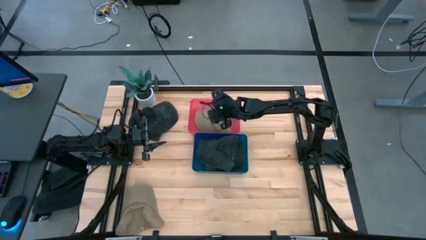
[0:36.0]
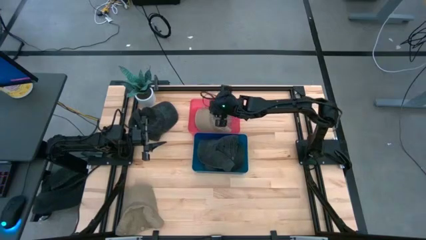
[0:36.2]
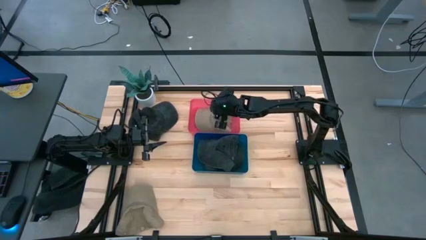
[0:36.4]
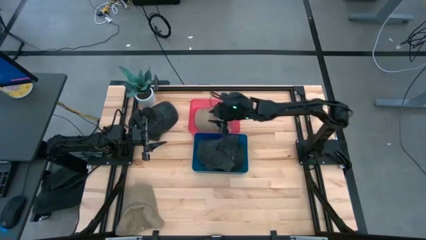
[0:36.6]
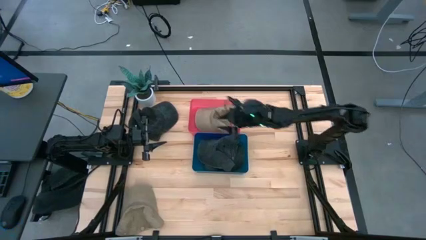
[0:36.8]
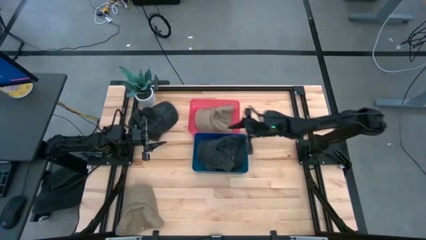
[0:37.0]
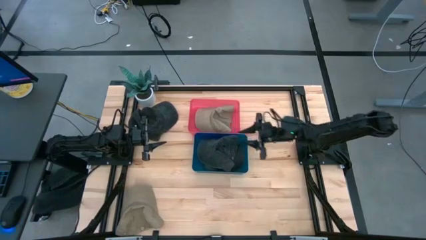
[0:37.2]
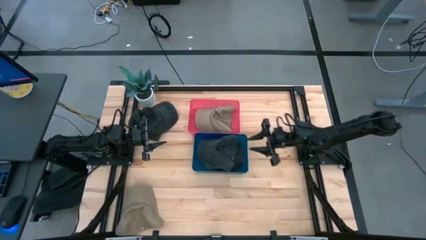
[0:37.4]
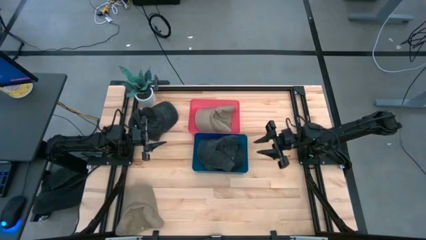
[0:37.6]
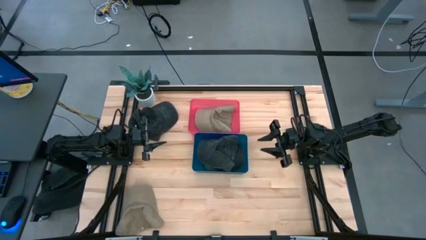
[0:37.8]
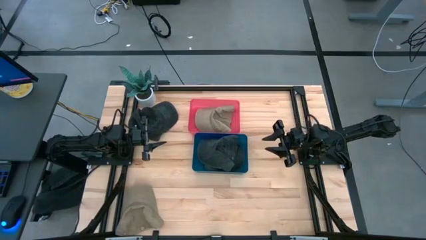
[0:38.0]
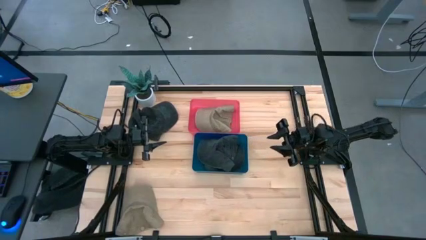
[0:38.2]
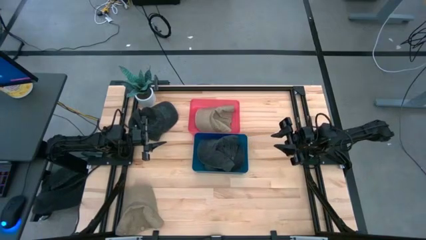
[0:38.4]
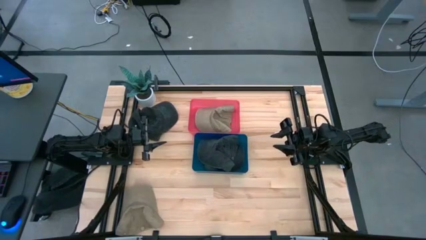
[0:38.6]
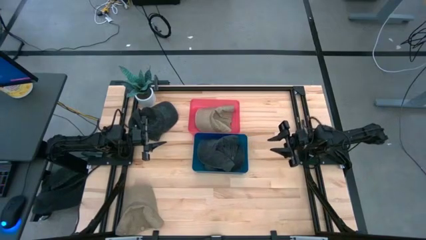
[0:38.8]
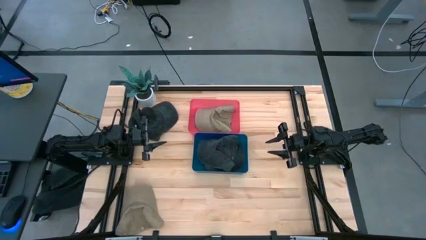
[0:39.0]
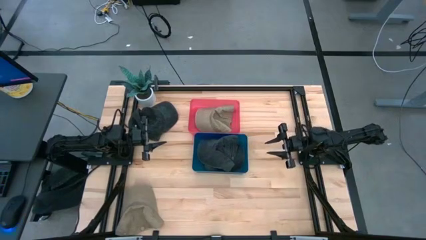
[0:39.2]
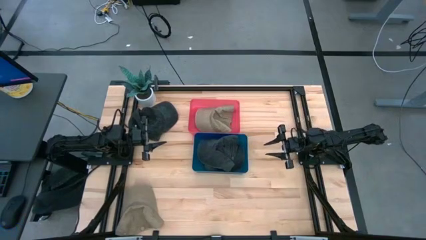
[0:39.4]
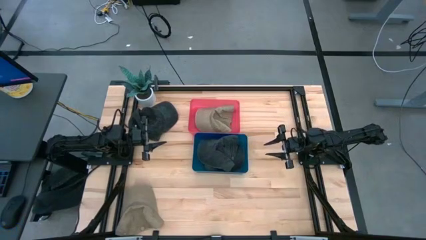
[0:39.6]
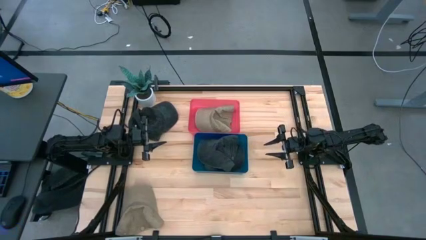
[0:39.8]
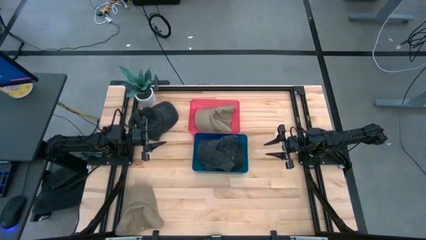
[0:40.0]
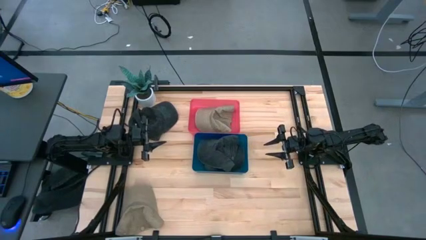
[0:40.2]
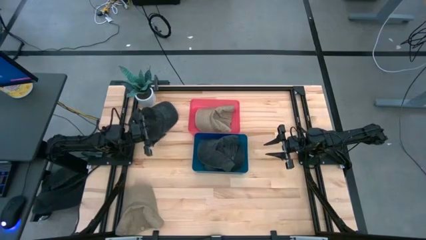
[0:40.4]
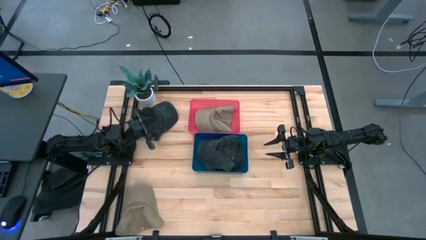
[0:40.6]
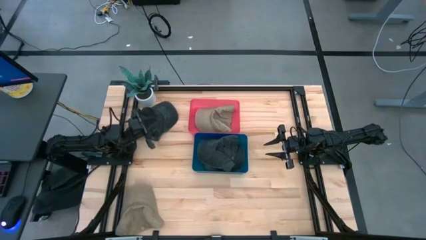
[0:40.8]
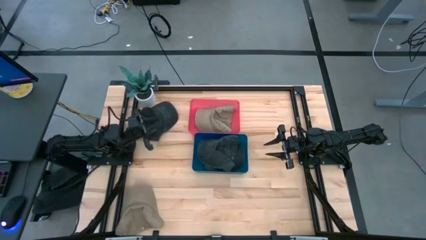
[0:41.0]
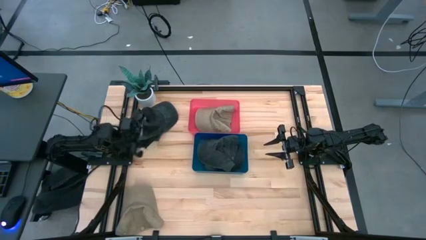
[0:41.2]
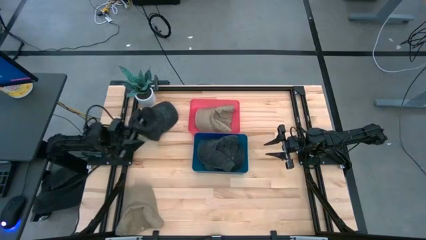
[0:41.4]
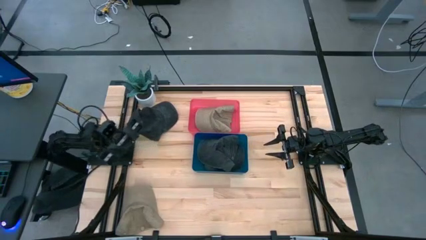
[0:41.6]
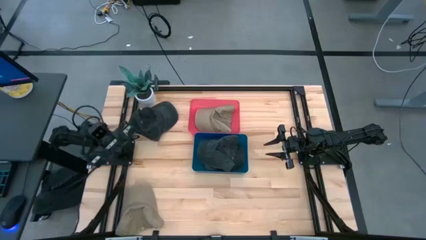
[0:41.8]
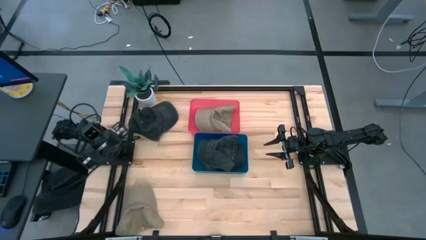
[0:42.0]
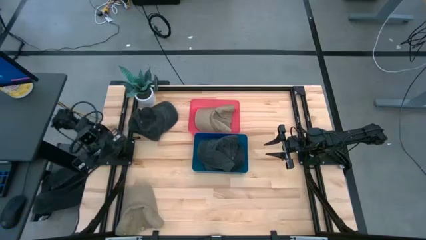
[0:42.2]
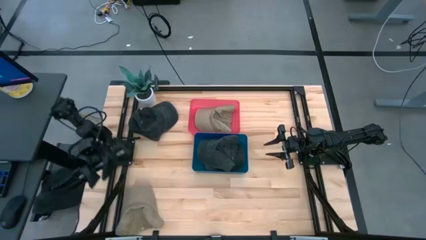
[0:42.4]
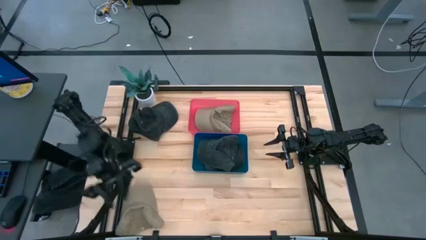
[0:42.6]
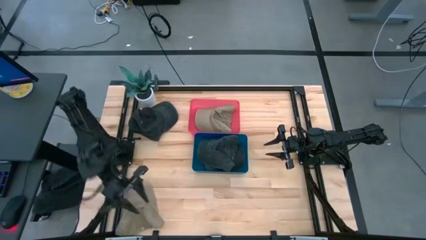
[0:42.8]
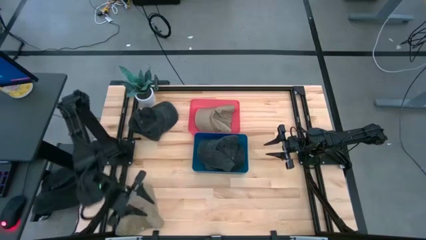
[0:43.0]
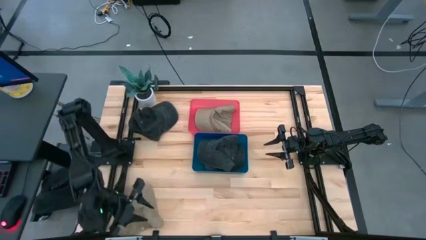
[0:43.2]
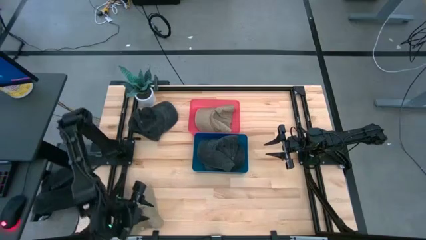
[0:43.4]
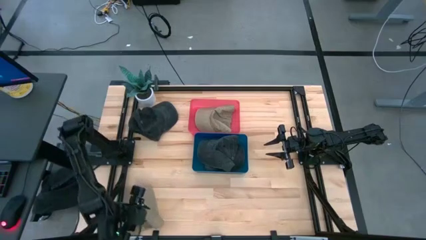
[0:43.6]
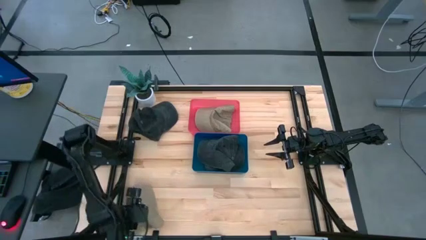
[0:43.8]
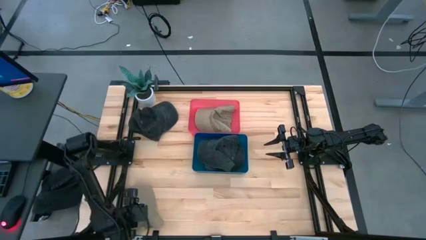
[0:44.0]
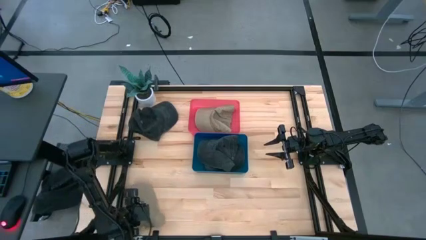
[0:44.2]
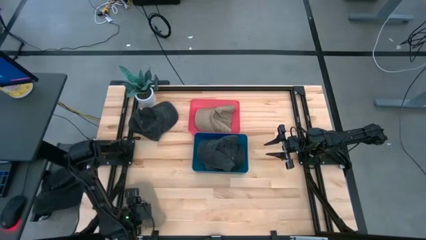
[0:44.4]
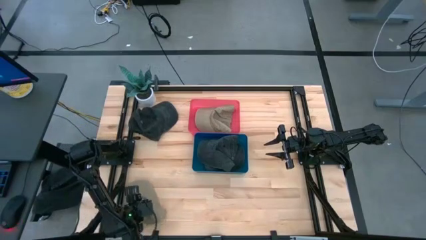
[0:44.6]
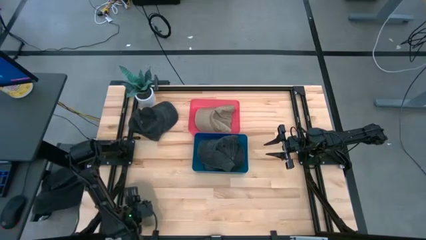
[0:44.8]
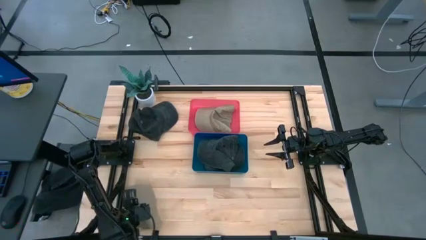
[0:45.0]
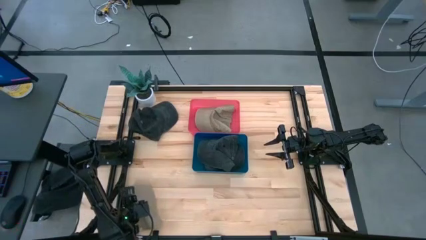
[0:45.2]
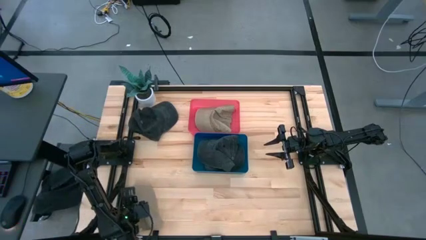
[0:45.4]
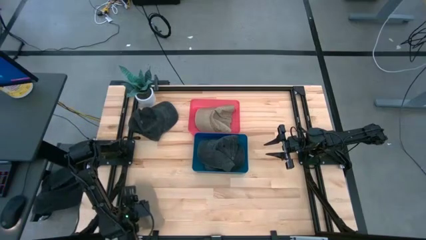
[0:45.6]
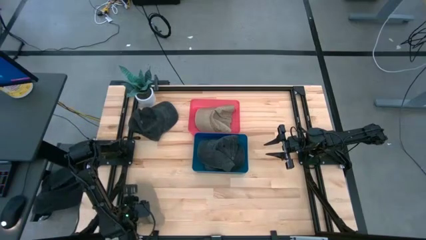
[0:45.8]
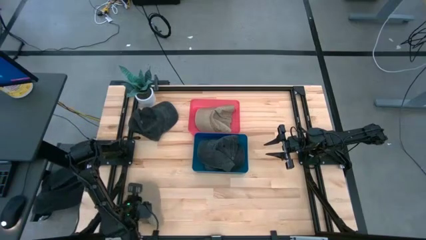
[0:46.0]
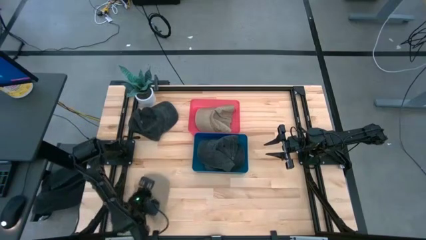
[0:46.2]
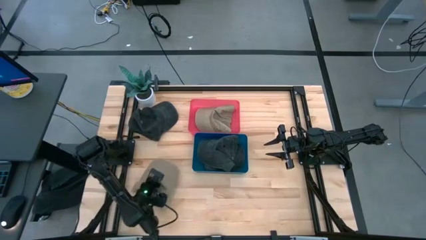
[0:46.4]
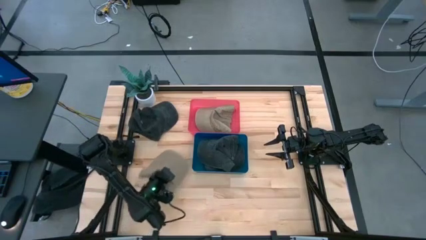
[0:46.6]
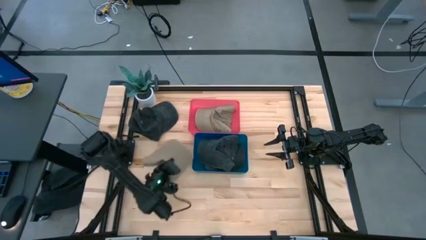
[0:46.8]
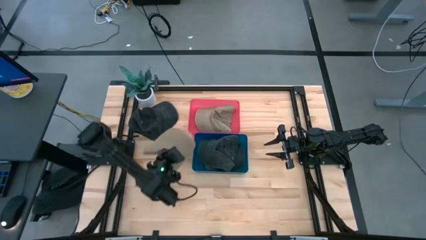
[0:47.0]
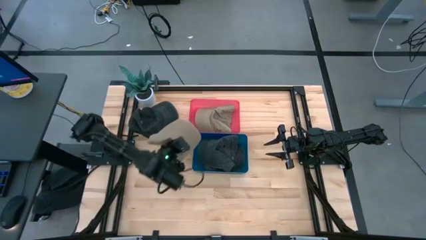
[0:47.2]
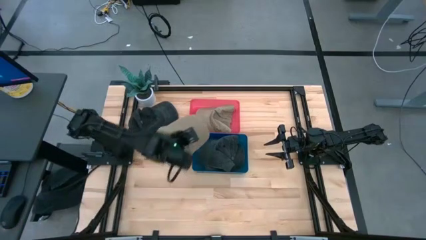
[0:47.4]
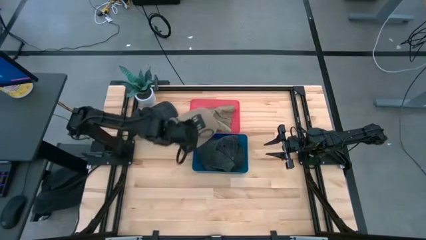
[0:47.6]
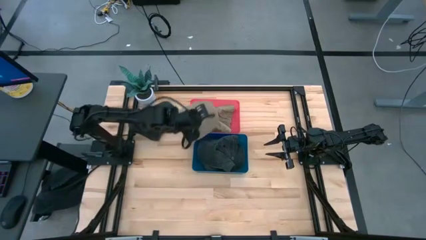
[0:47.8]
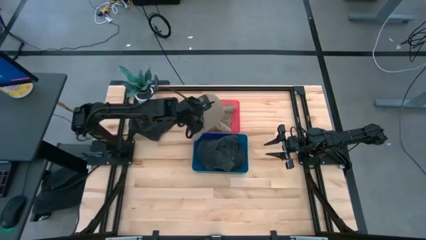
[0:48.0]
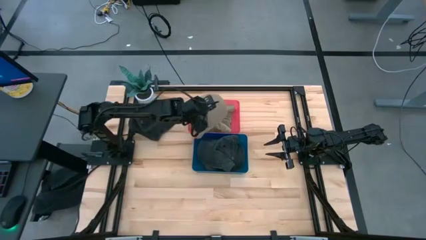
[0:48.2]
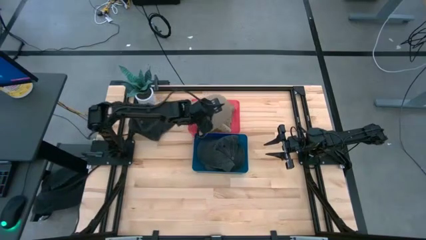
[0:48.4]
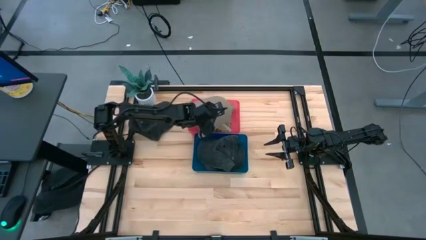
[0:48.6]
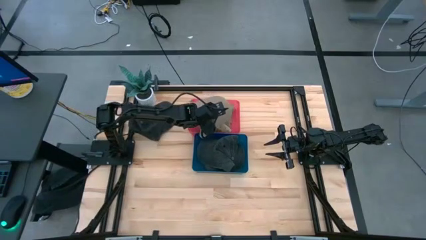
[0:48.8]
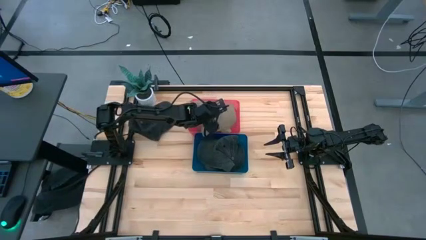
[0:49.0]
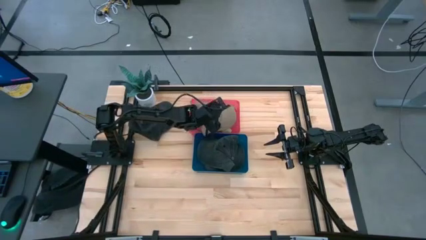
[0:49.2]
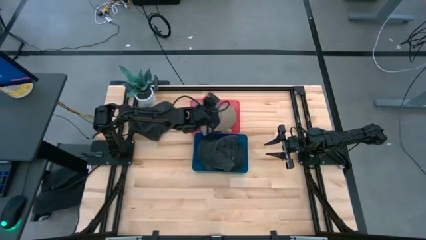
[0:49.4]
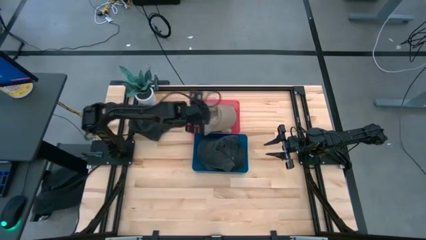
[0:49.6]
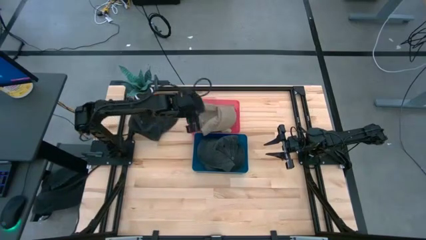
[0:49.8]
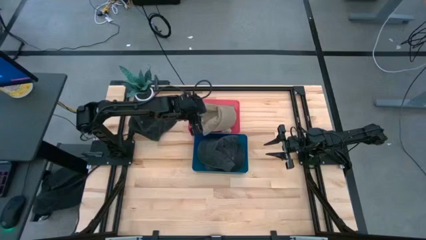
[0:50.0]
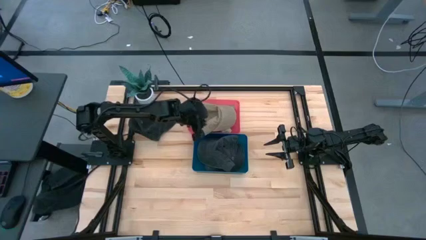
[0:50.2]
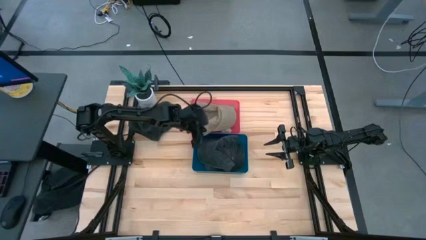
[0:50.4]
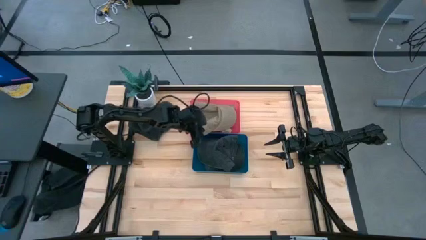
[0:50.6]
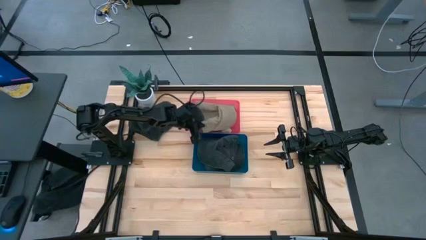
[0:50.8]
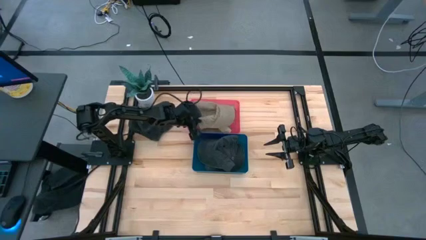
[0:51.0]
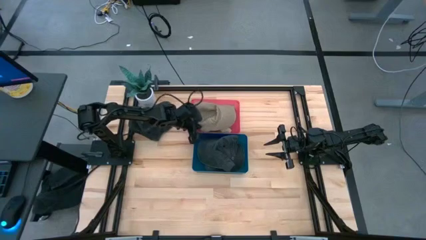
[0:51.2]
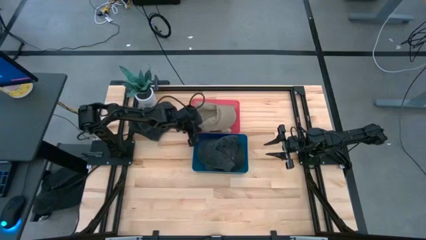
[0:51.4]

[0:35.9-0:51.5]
Task: Pick & Place hat
Put the brown cap into the red bin
